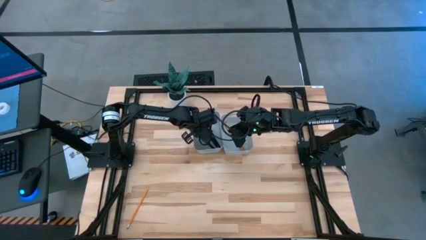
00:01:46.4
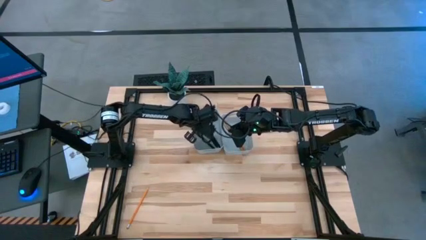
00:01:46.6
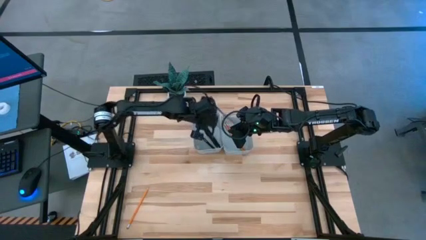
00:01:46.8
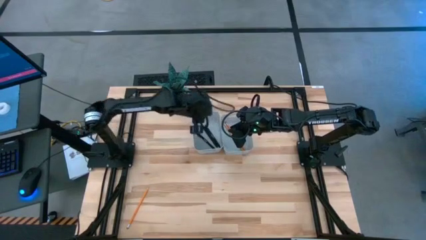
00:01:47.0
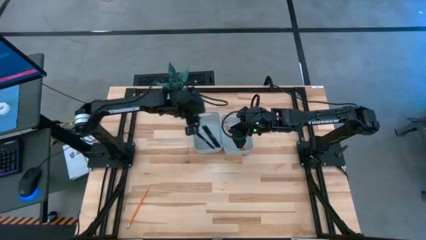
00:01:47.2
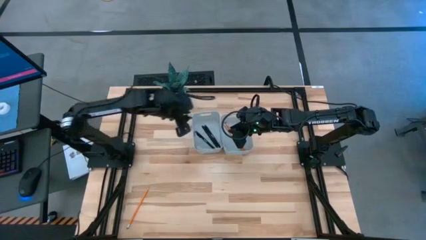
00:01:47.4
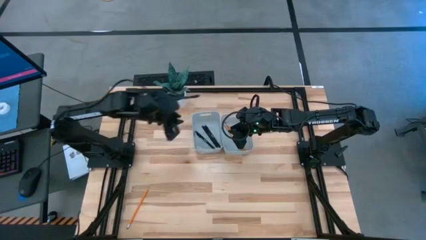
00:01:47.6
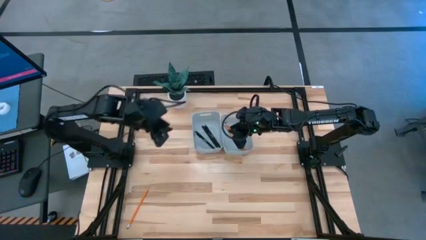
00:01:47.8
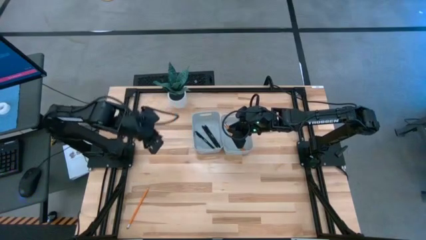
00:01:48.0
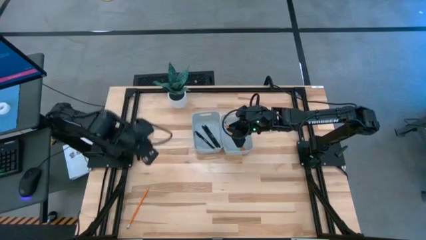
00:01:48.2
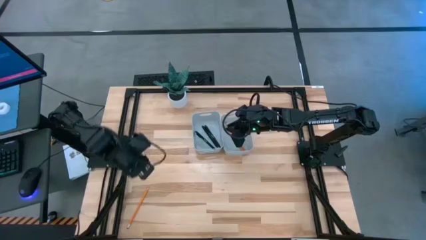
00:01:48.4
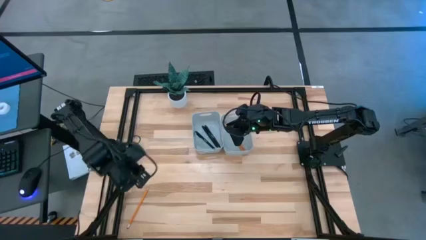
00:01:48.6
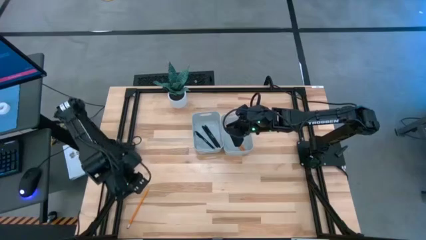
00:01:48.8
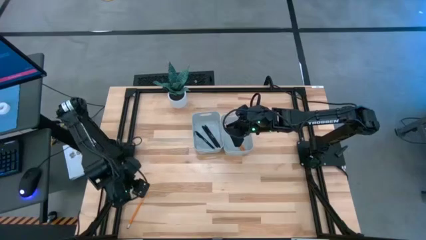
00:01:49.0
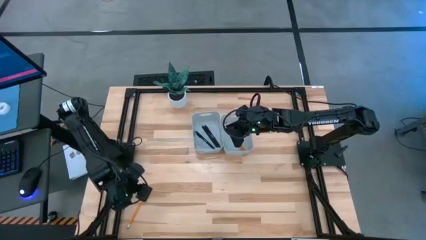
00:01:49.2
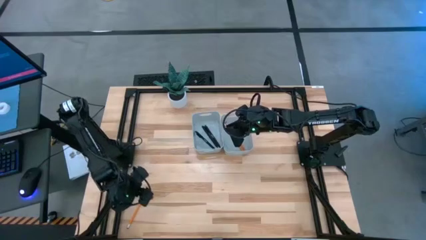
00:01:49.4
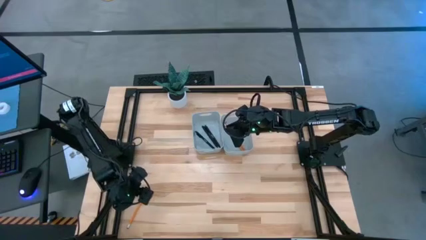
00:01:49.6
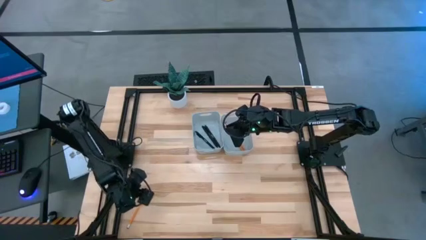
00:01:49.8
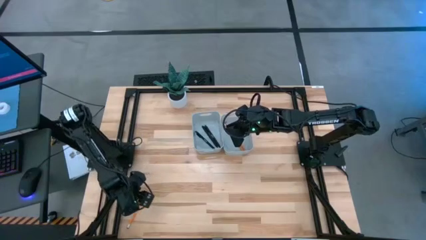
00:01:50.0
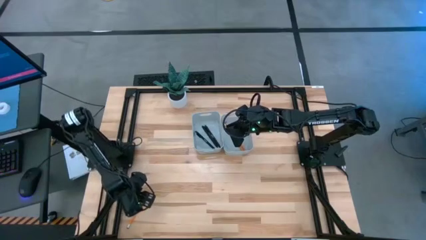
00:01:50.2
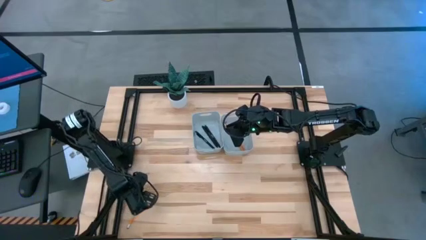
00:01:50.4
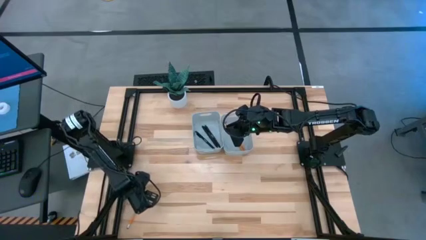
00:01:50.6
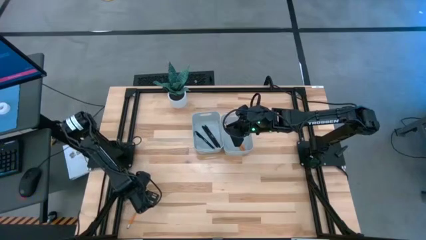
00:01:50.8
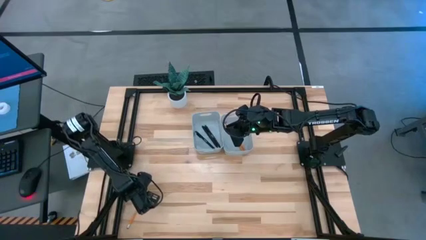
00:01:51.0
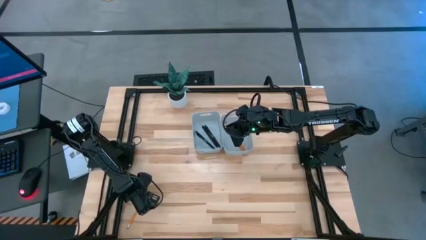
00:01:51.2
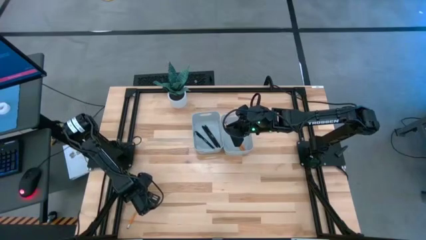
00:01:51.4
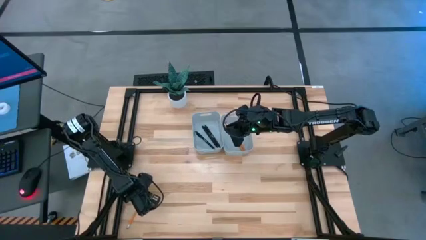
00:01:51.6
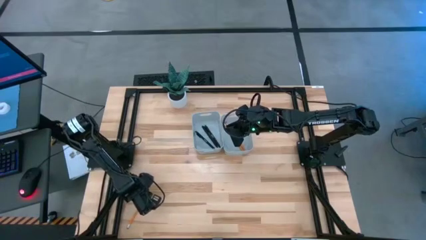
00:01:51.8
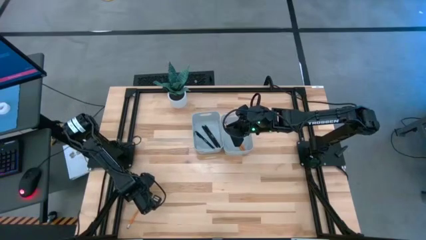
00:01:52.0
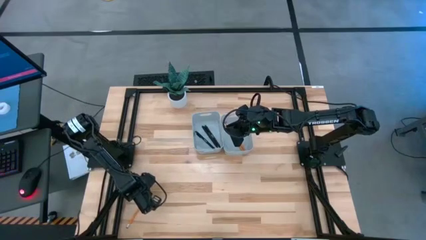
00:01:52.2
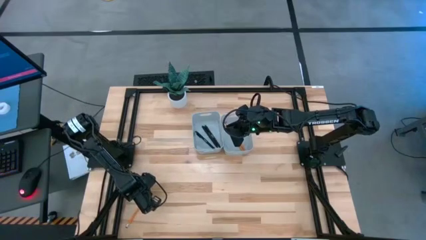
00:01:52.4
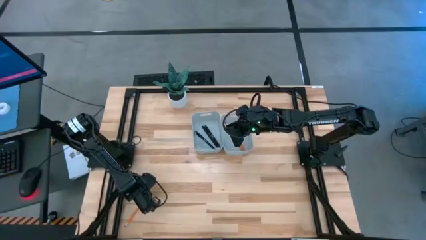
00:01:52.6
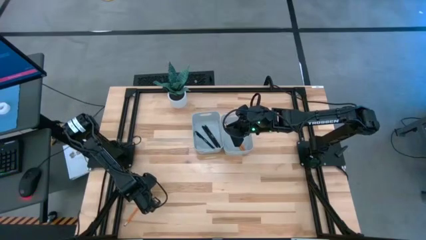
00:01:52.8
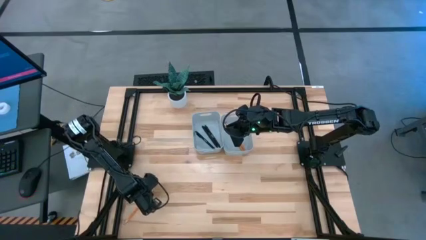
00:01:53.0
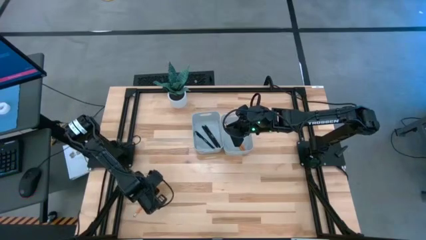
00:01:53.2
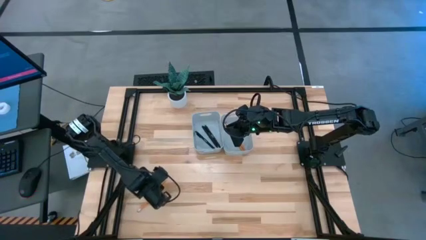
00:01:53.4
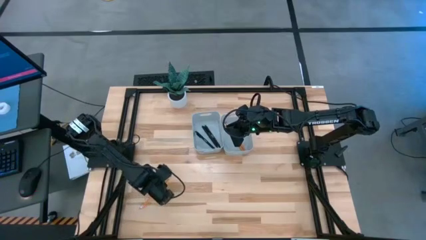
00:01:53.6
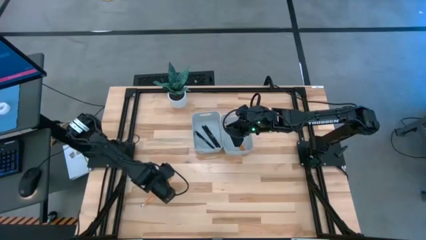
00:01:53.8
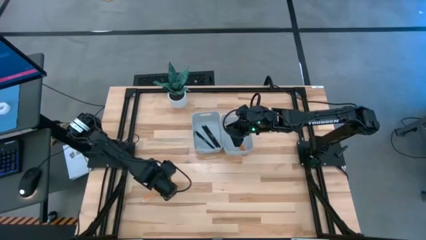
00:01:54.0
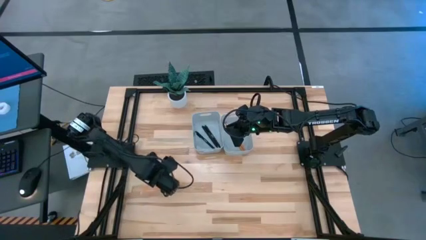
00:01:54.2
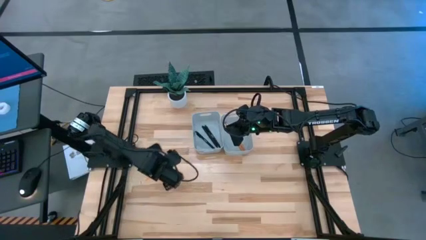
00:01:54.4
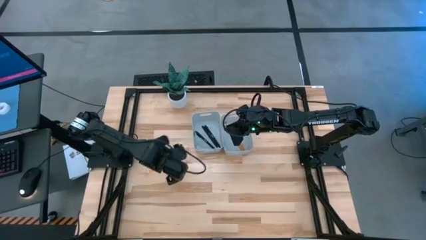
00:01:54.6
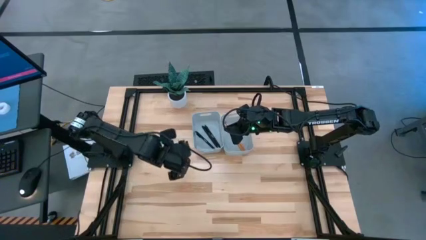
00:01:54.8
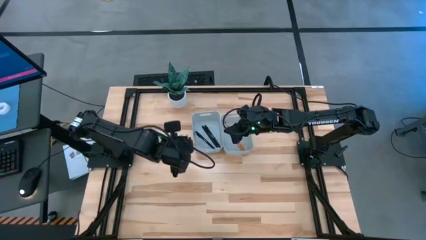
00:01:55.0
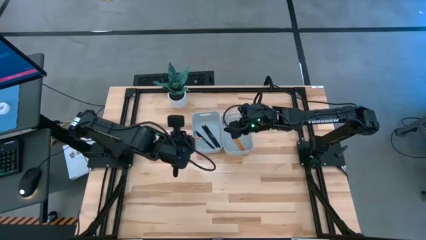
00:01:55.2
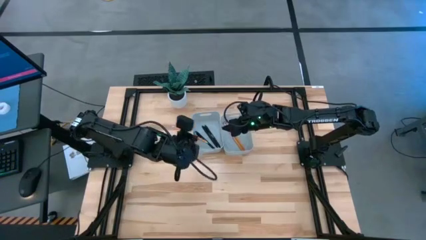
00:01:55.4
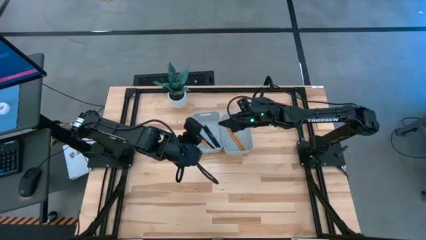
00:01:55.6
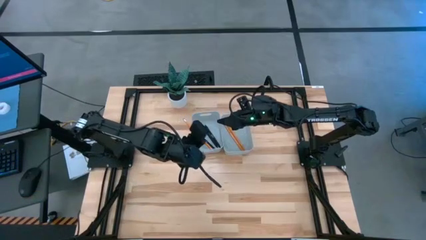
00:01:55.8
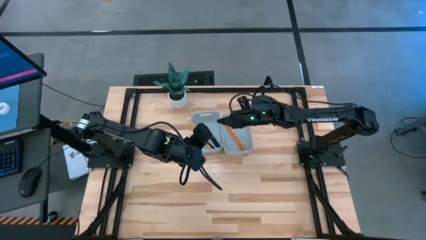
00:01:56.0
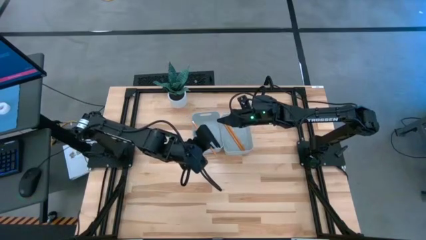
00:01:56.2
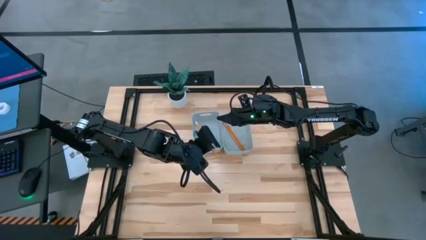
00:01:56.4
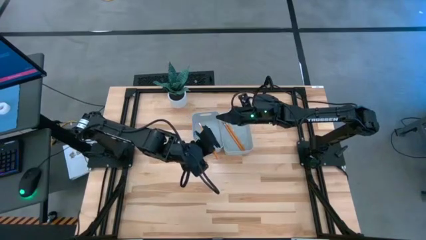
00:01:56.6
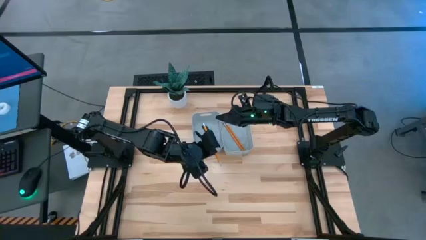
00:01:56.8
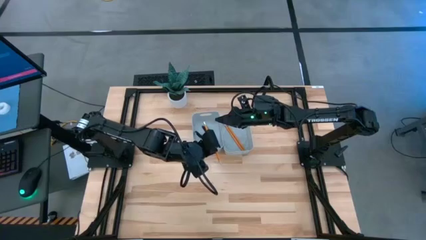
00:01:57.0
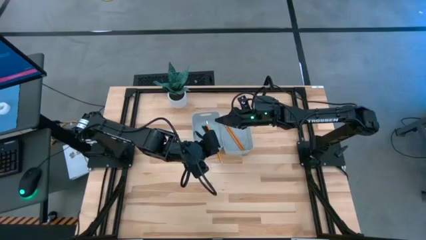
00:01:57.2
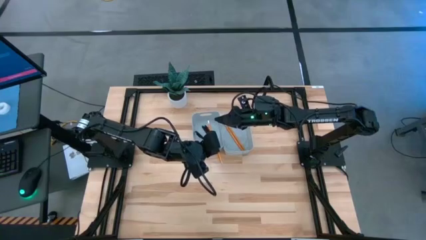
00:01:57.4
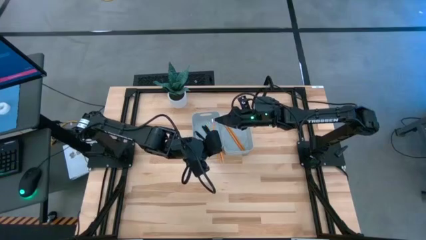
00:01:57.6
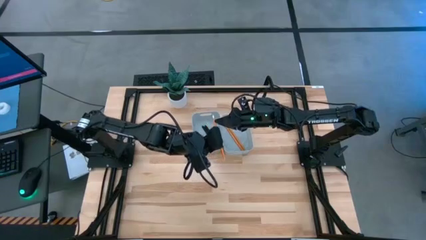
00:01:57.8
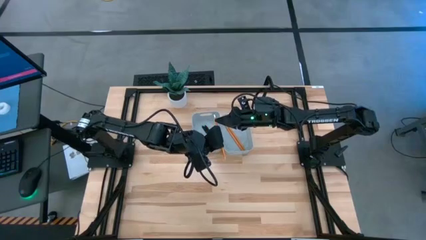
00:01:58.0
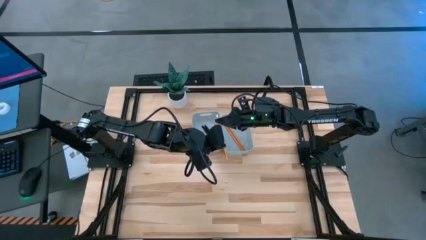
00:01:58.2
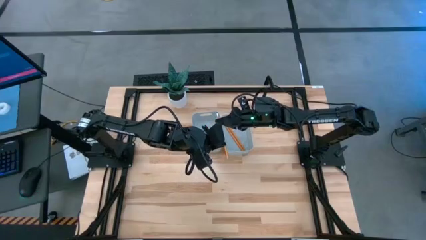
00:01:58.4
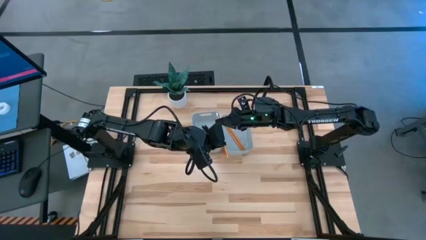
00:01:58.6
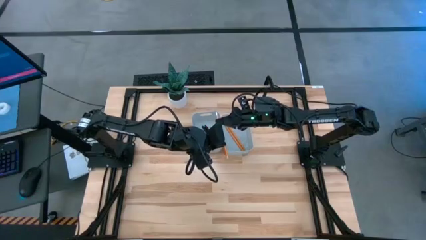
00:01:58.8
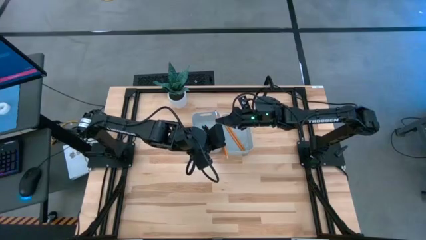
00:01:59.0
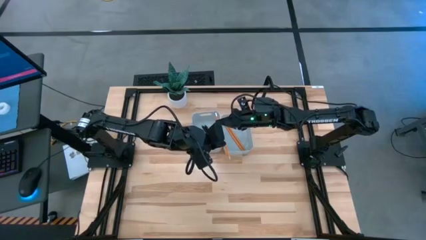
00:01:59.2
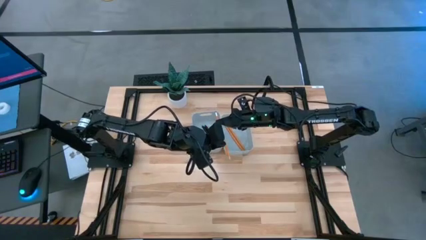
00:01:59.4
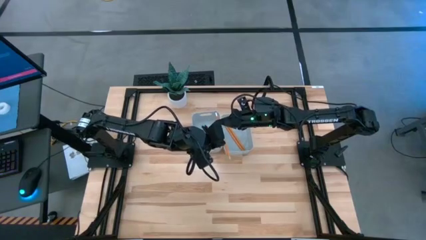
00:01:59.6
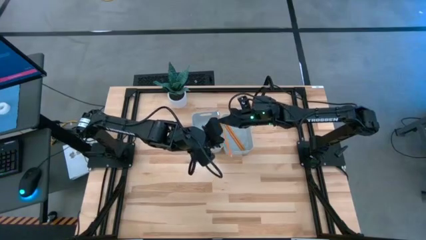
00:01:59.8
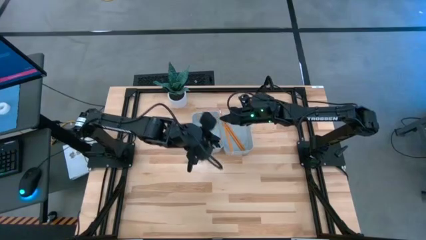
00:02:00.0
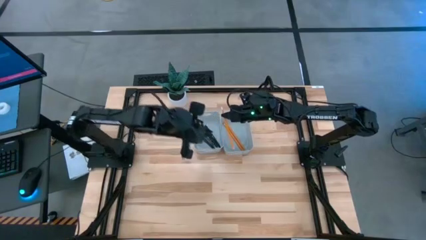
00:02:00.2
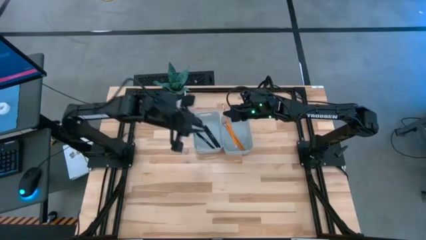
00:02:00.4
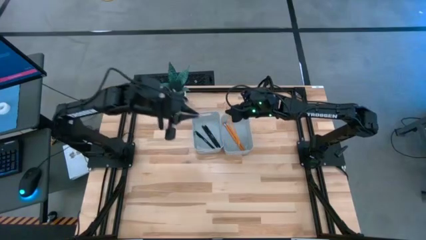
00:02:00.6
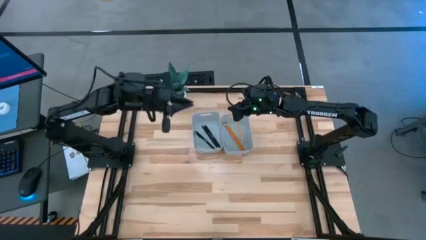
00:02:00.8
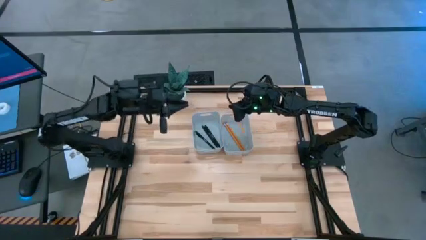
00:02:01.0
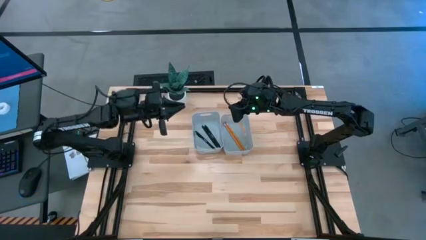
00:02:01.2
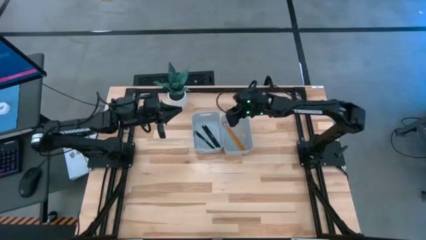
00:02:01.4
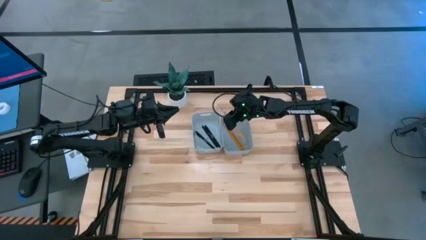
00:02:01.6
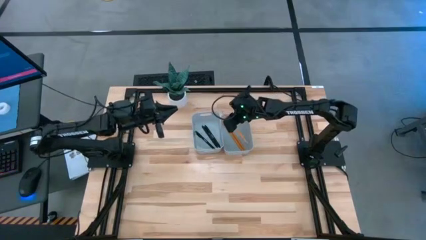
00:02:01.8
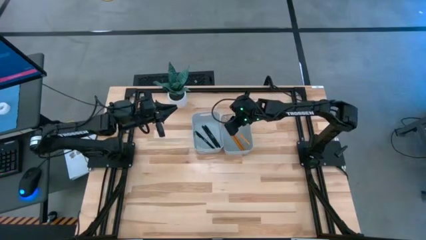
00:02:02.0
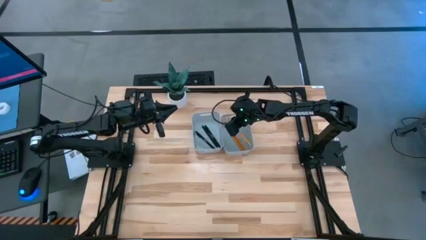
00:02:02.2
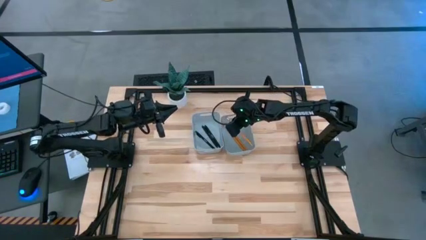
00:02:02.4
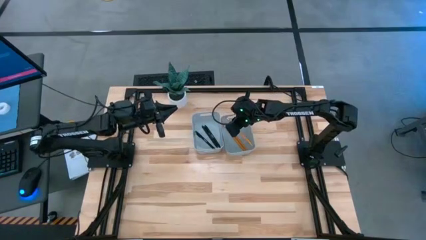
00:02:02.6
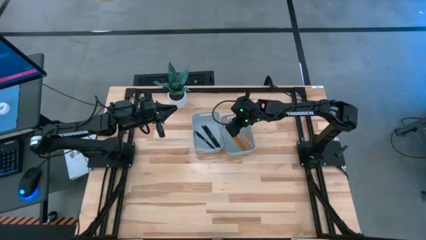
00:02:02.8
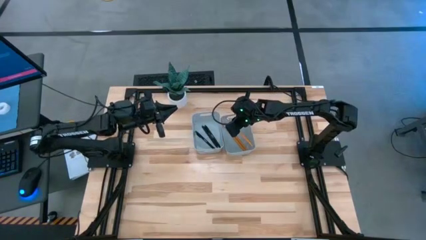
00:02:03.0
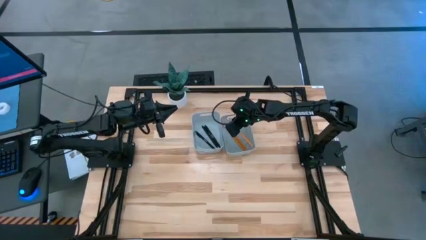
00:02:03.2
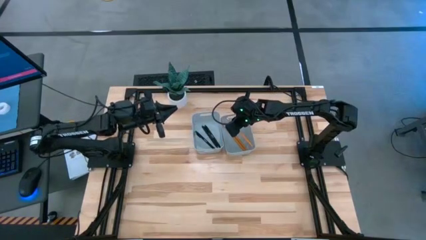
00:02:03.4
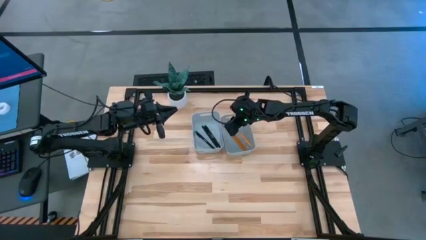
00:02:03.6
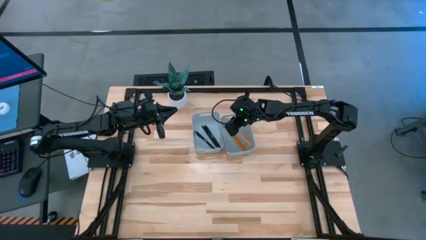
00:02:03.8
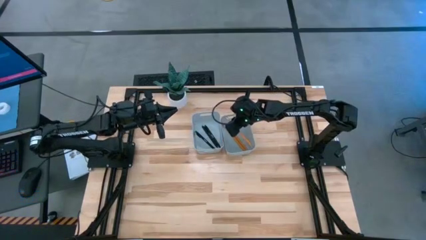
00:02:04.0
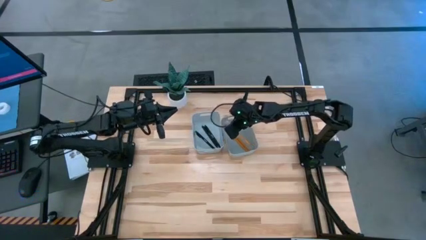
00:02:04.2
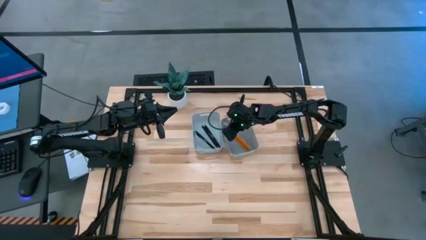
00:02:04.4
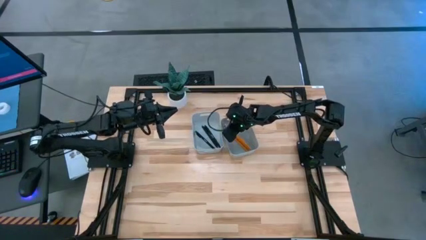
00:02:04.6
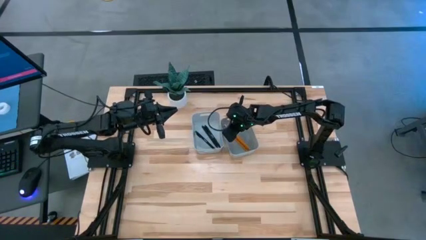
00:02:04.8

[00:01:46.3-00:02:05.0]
Task: Sort pens & pencils
Put the orange pencil into the right gray bin
